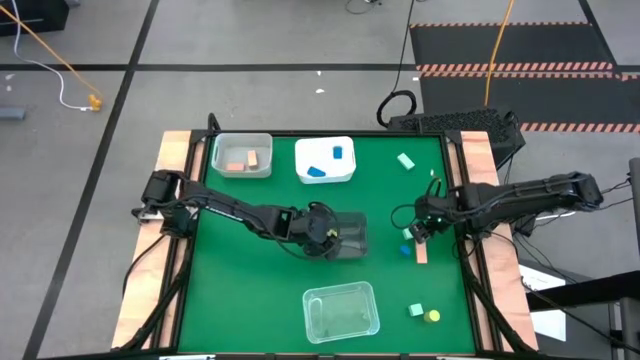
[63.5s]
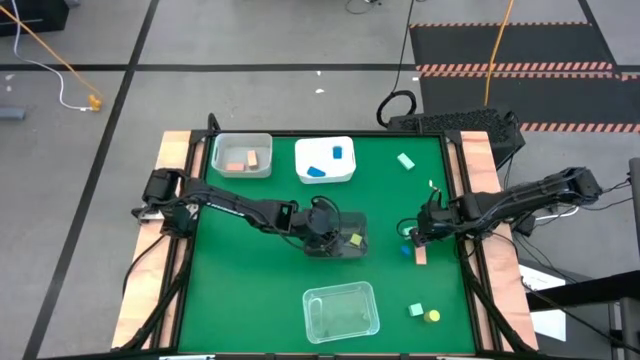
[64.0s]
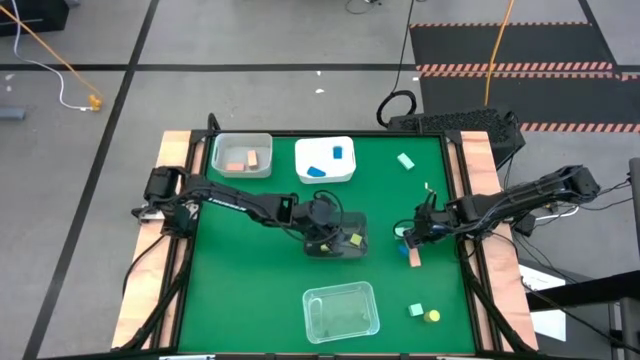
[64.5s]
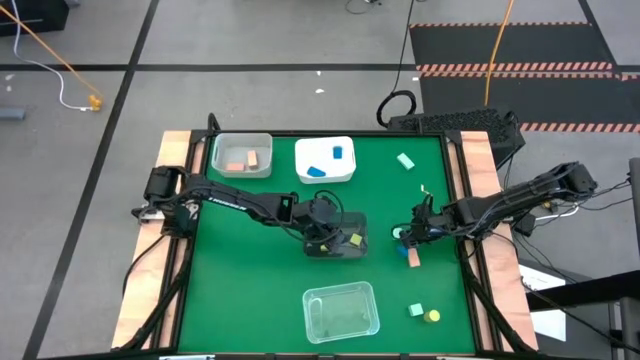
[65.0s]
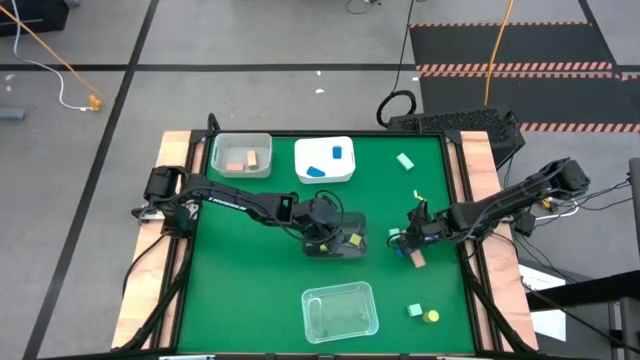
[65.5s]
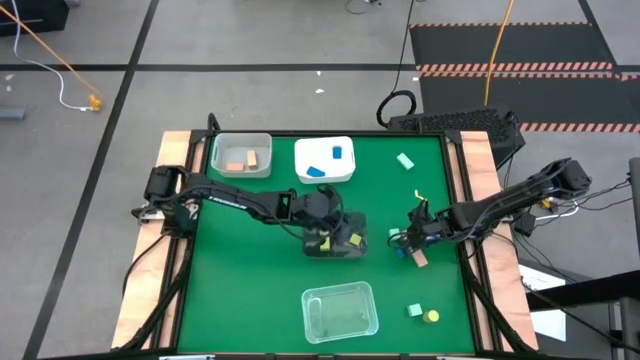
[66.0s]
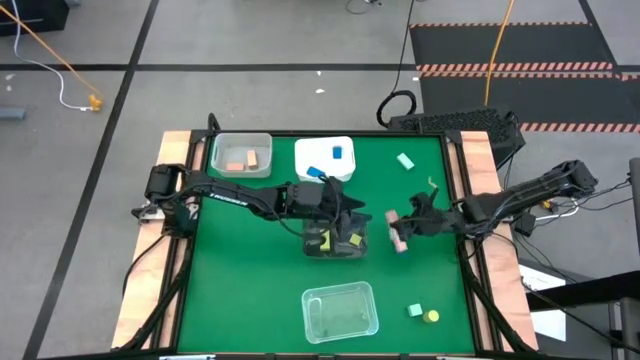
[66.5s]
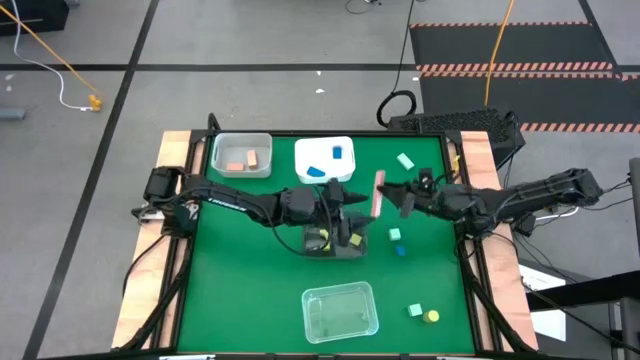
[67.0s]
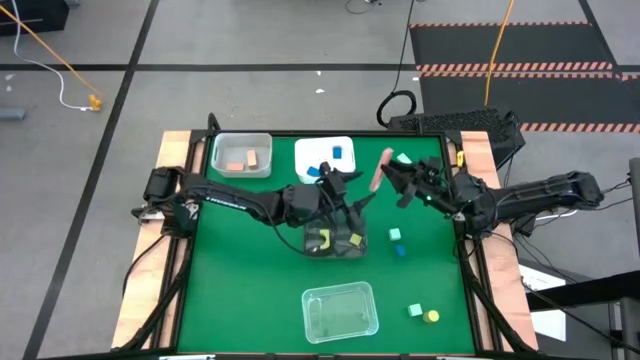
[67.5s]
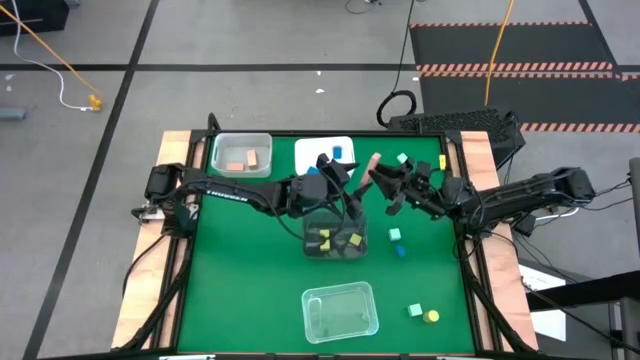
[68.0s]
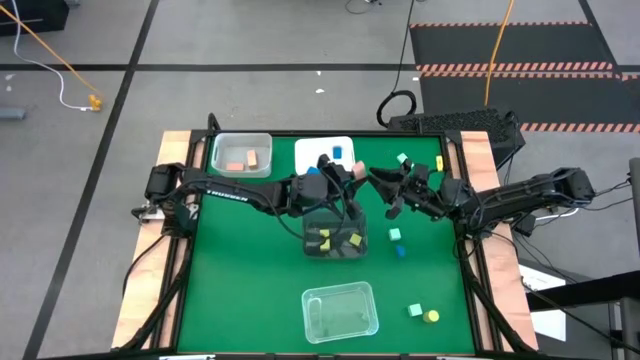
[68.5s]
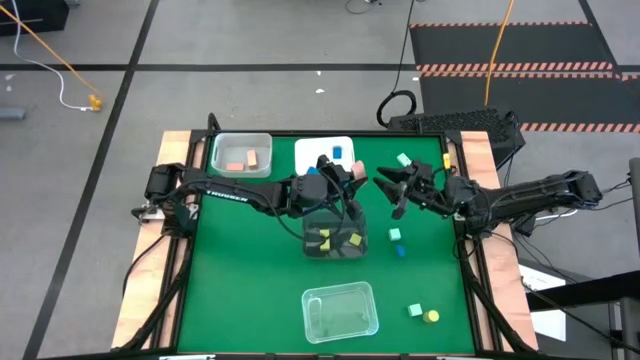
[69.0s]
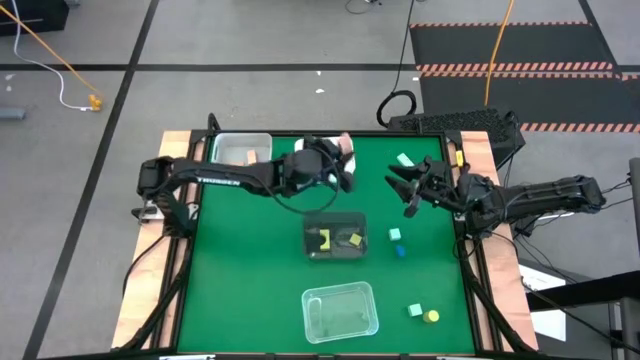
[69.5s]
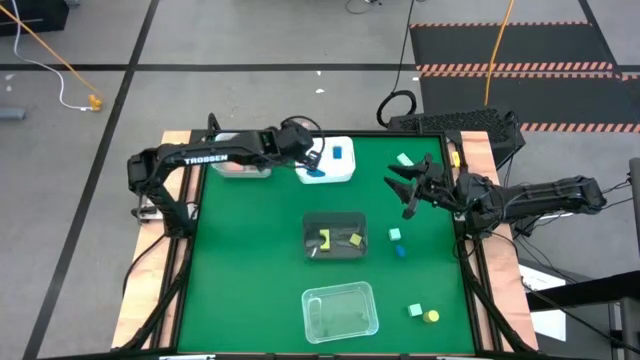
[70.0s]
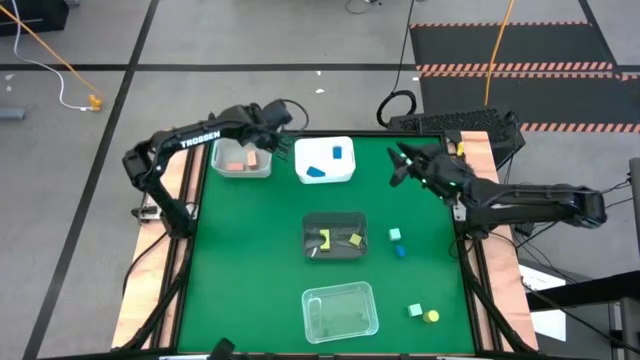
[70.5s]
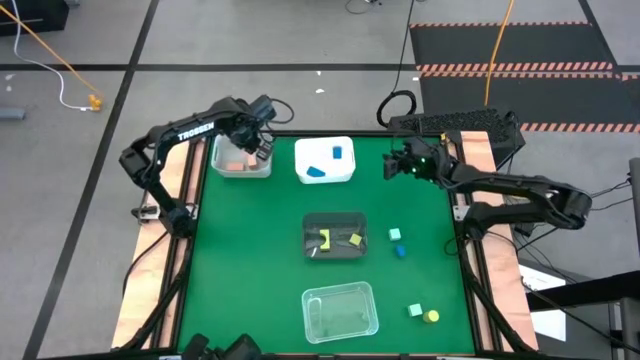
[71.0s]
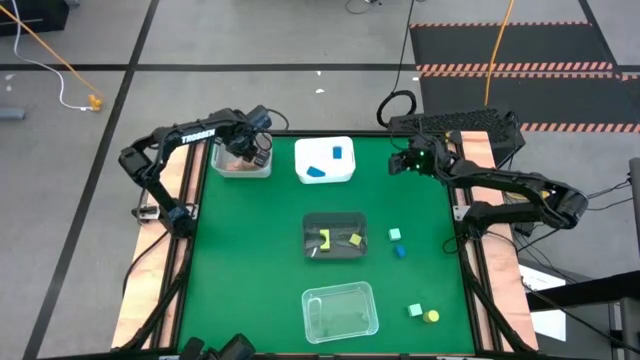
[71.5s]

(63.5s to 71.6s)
Task: Sort & place blocks by color
Put the brown block into the gray bin

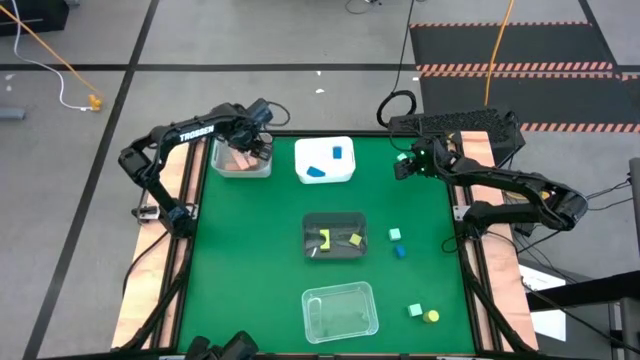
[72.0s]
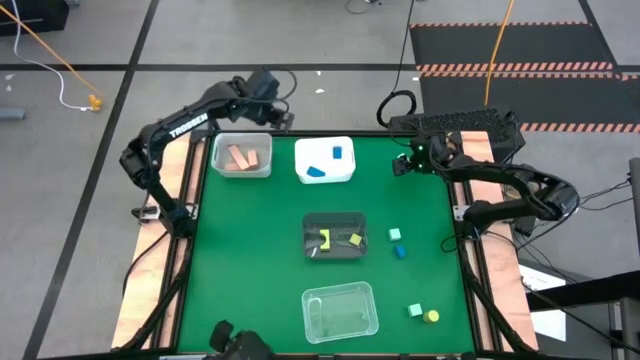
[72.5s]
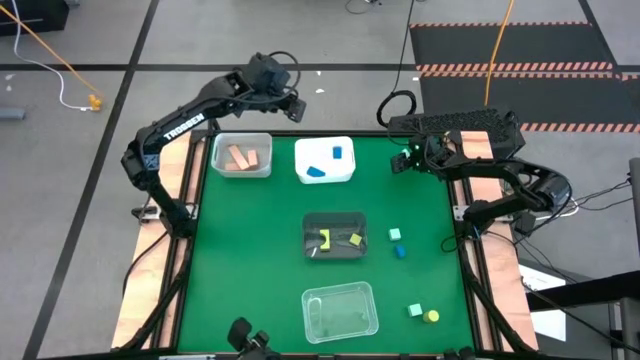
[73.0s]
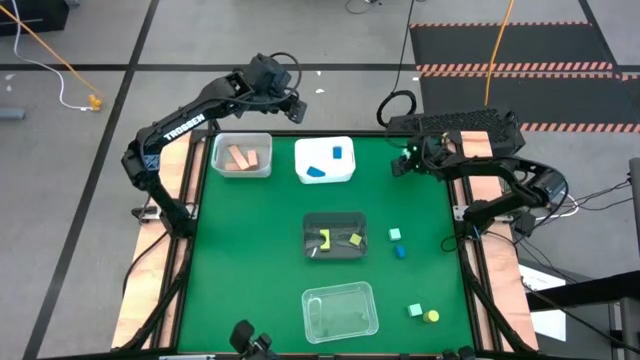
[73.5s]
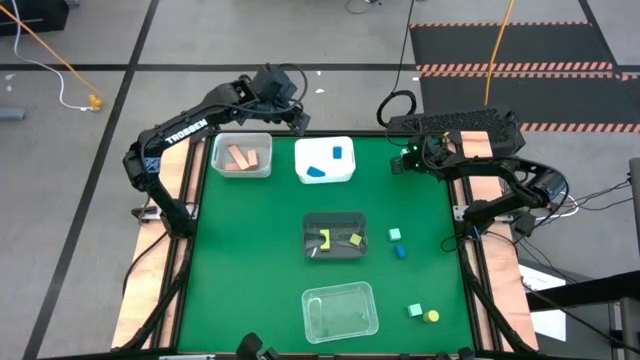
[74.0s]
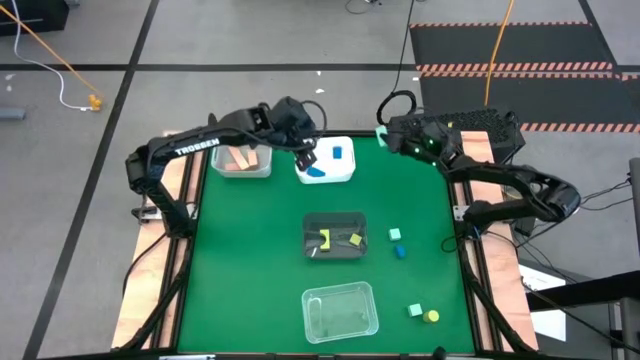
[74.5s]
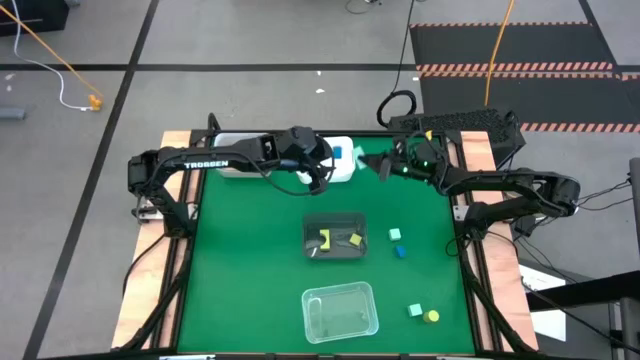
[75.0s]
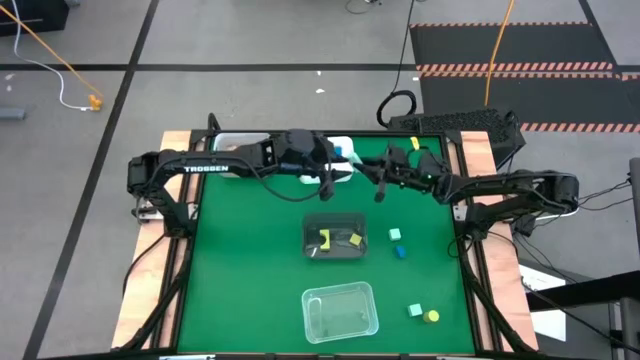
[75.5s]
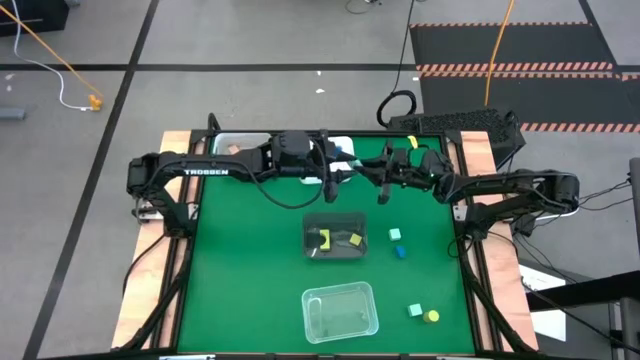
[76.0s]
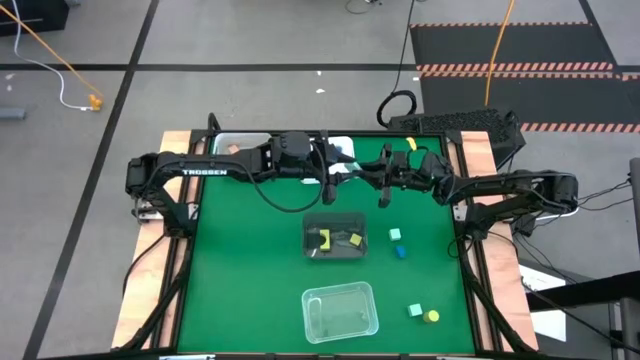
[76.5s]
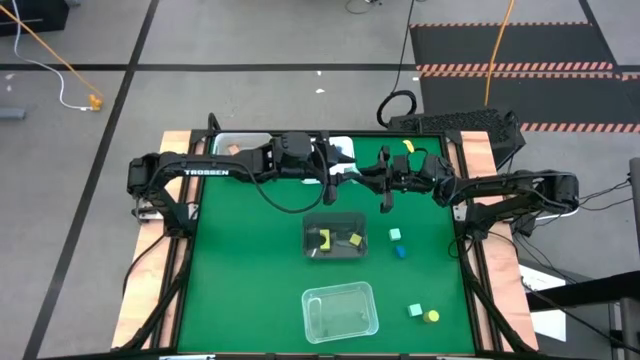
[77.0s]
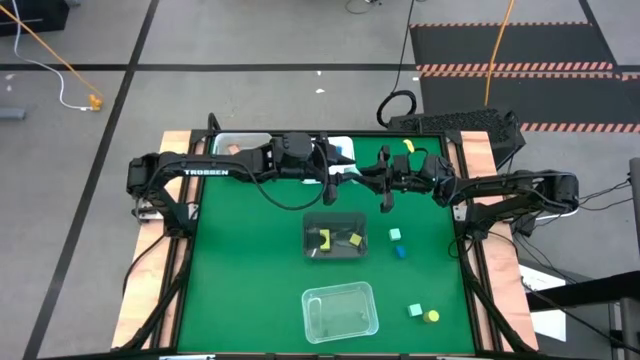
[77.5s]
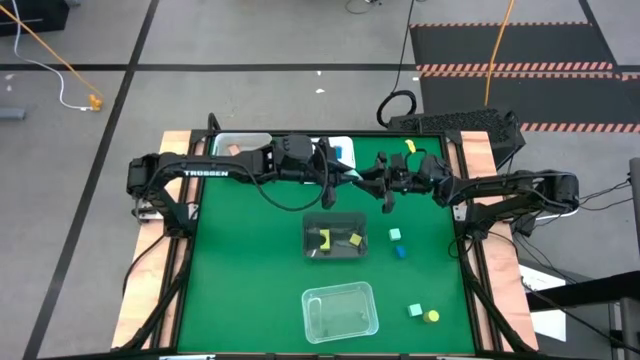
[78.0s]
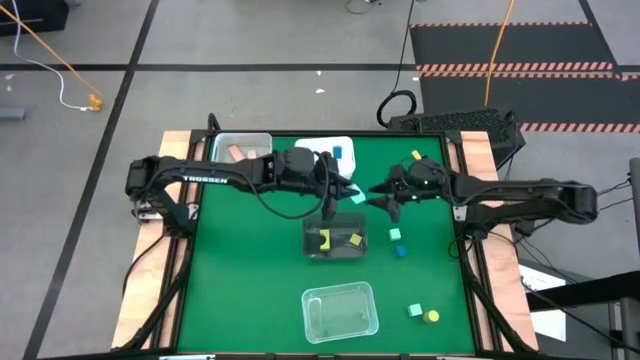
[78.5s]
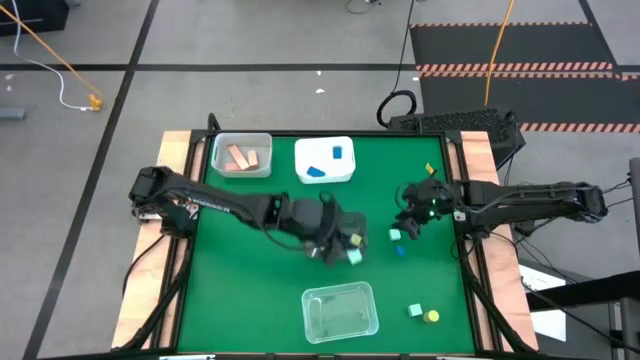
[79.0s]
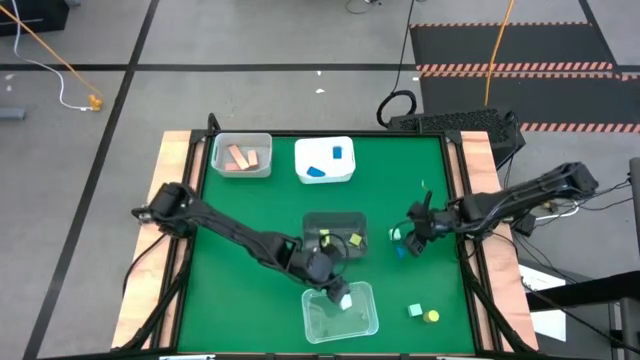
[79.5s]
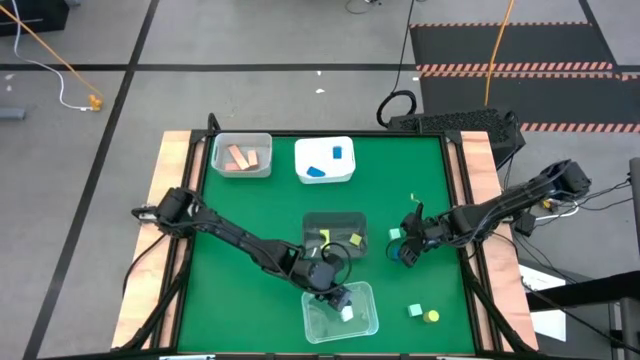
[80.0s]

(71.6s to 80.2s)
Put the top light blue block into the transparent bin

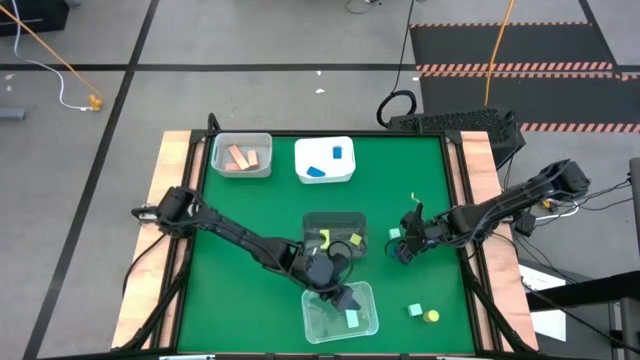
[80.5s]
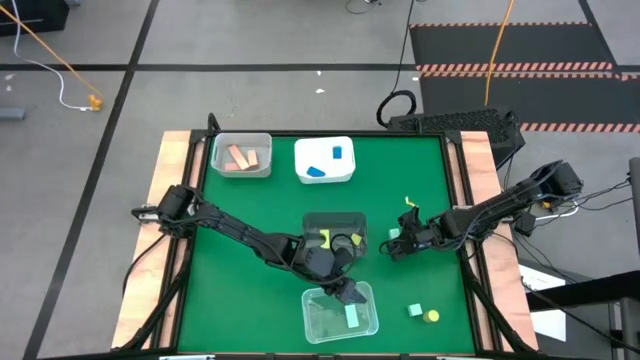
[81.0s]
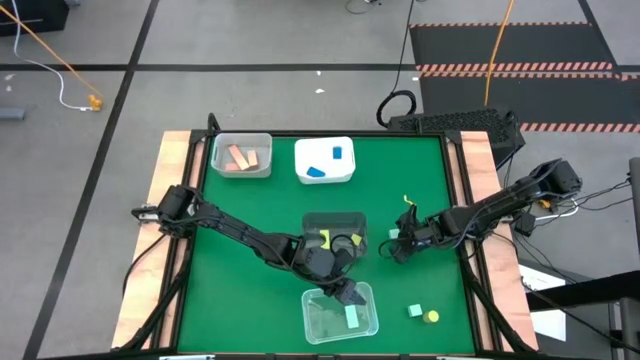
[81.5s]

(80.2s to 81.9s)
Put the blue block into the white bin

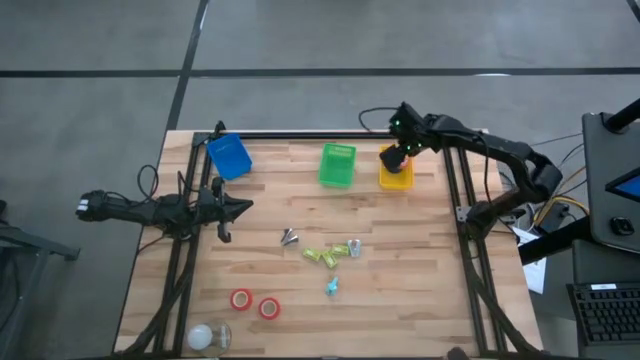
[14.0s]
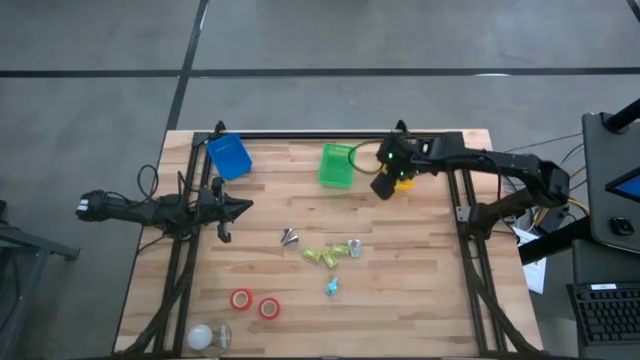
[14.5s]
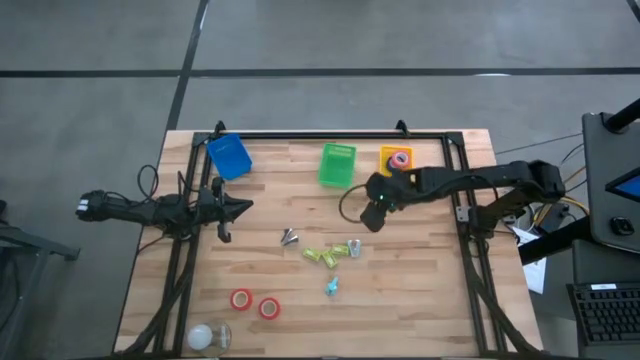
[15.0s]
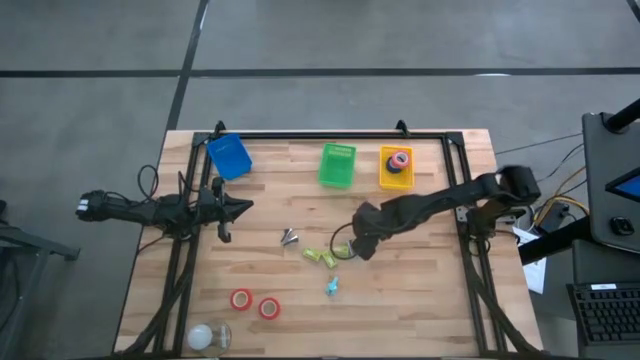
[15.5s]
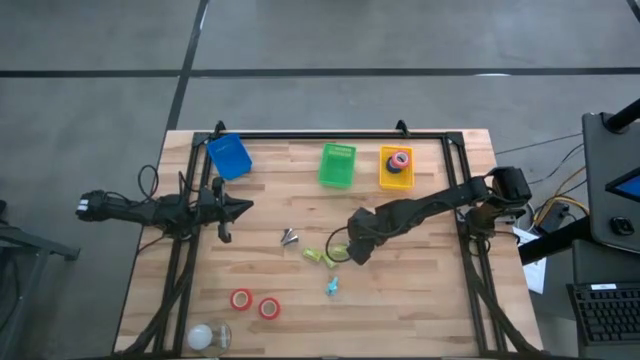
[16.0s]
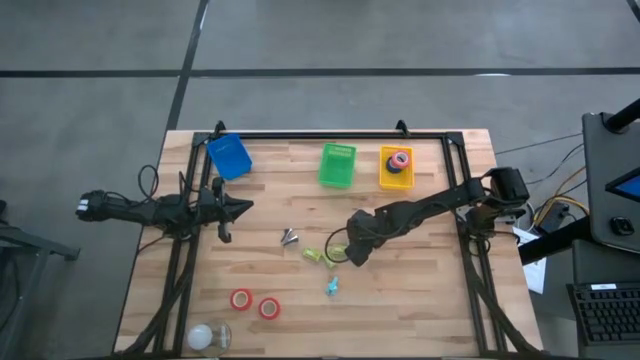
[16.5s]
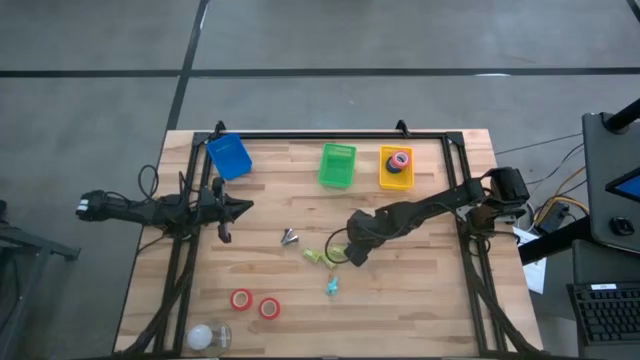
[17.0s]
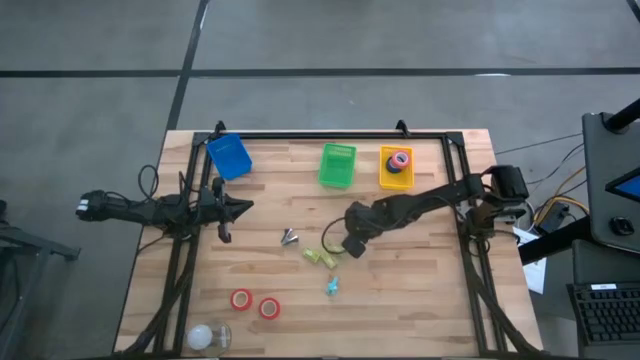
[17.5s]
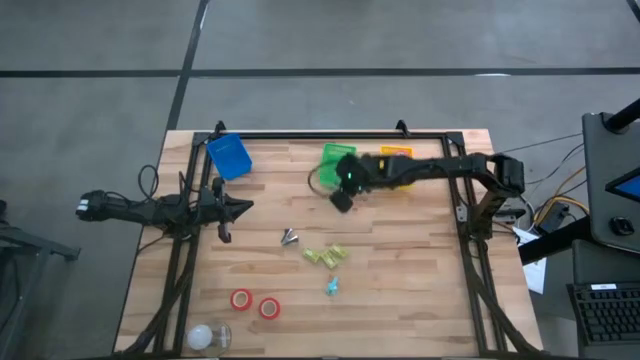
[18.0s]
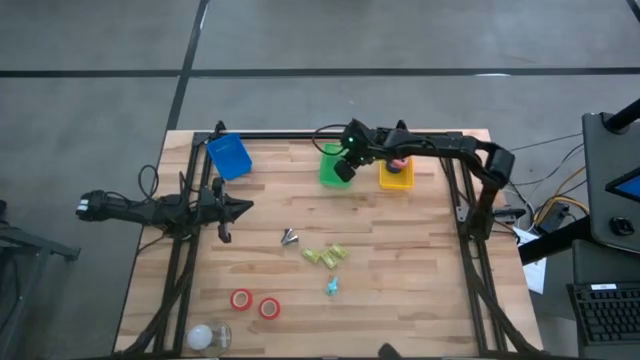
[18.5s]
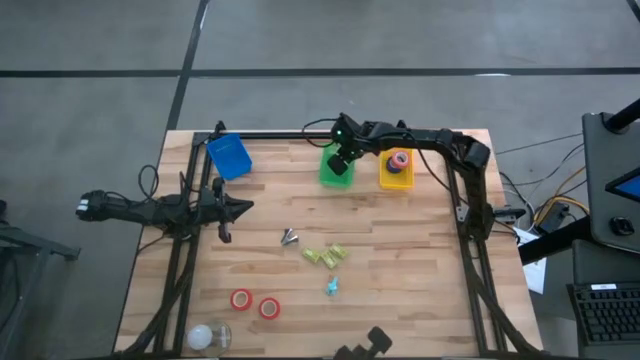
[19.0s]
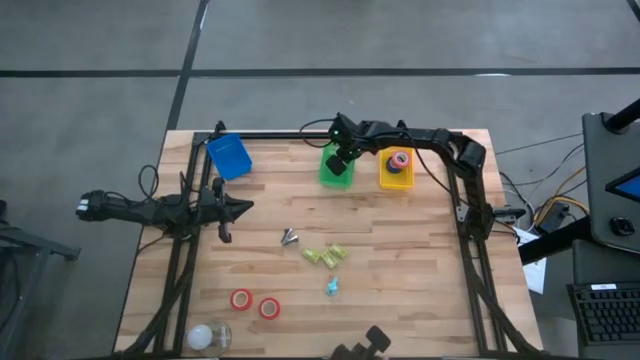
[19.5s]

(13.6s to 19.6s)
Task: Pick and place Stapler, Stapler remover, tape
Put the top light blue staple remover into the green basket
